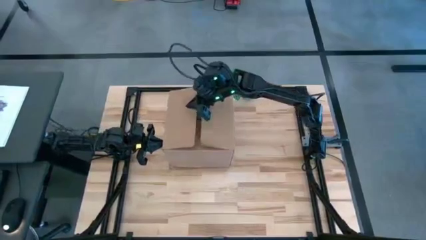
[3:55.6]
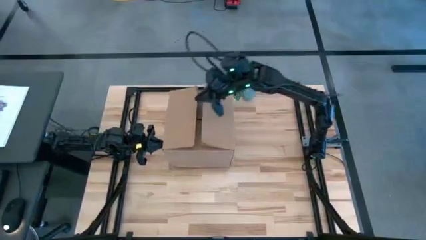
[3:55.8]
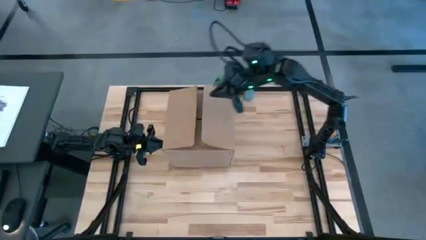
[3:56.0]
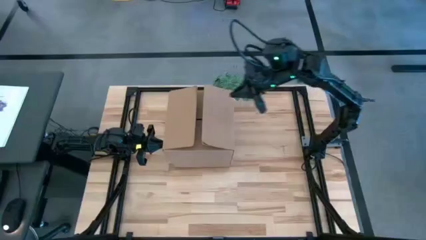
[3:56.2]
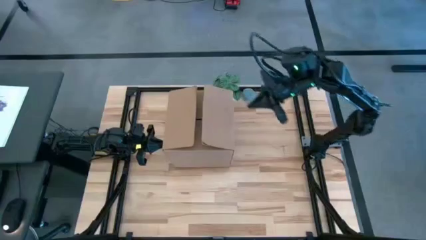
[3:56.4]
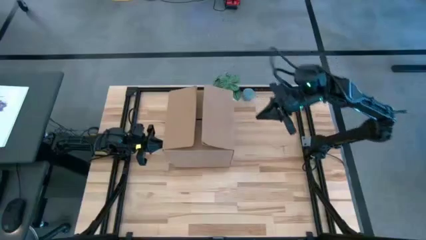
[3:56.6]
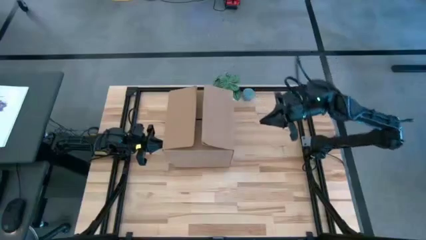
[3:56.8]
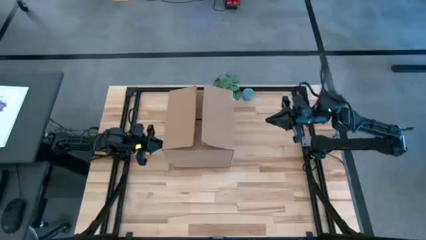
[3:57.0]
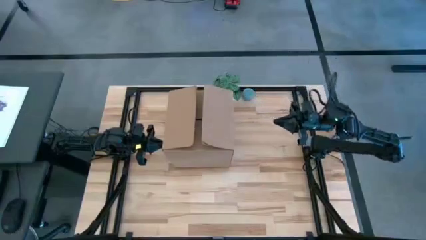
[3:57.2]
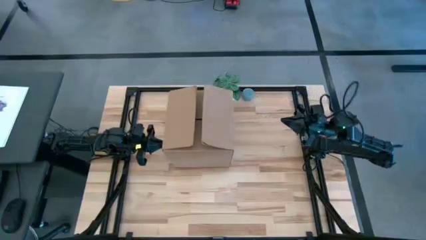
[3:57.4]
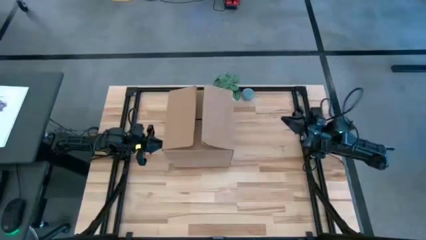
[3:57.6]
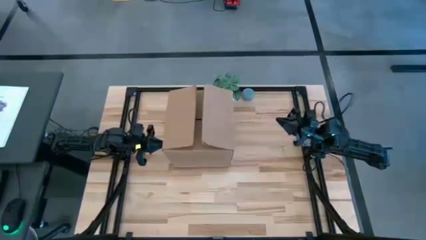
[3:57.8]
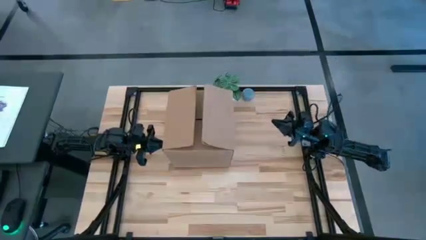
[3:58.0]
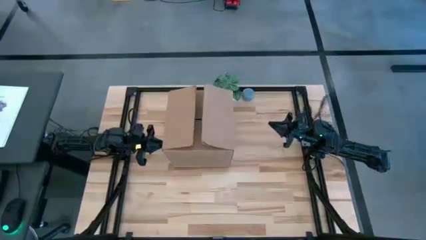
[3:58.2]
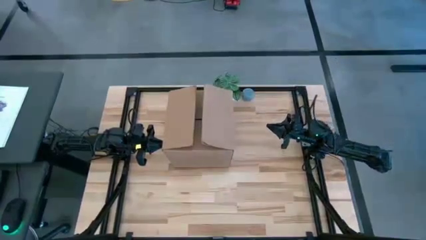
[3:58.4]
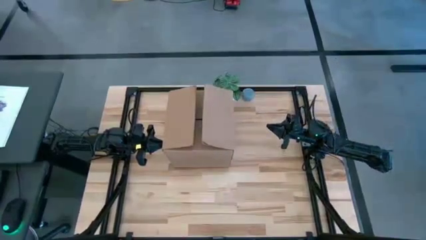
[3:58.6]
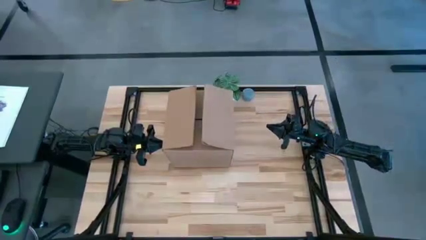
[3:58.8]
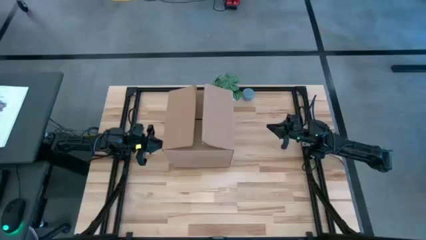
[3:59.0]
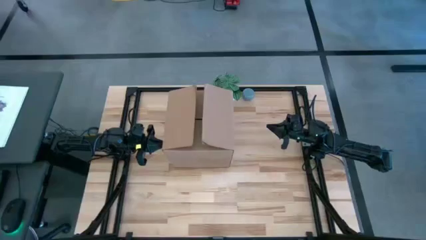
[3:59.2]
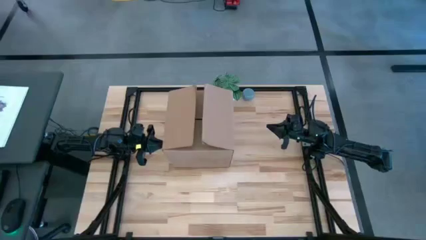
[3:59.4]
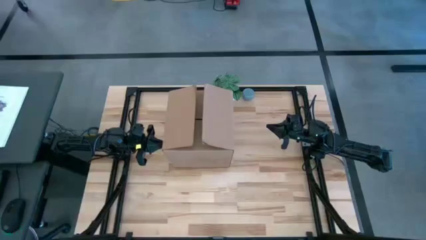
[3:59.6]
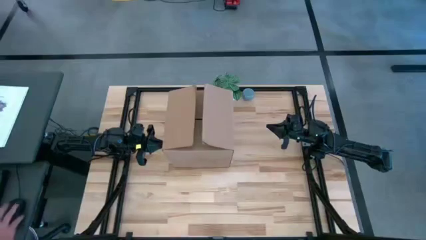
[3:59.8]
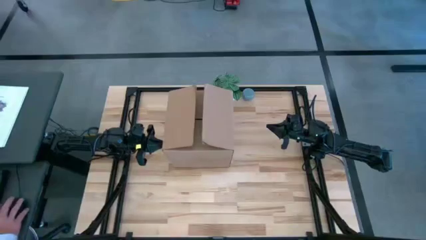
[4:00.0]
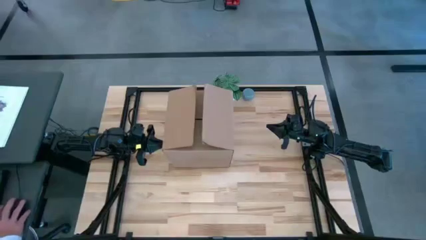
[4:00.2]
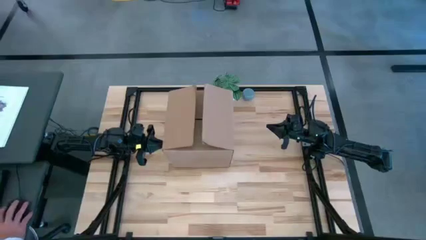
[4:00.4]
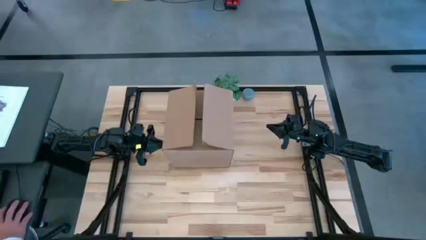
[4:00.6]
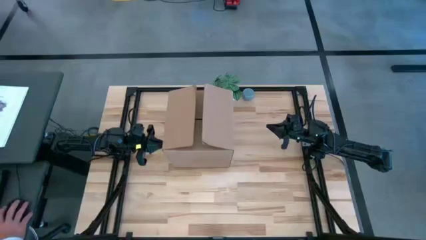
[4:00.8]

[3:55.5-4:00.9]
Task: wrap mug
Return to Home Position

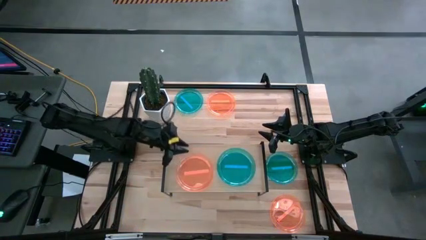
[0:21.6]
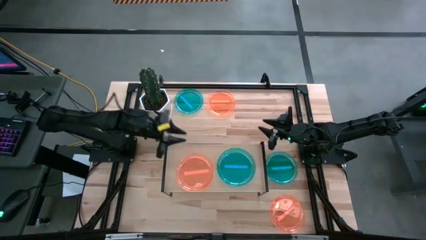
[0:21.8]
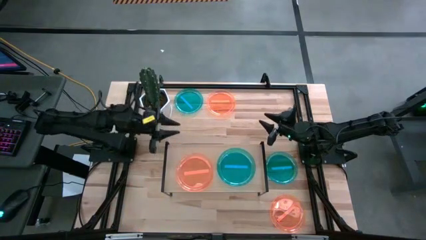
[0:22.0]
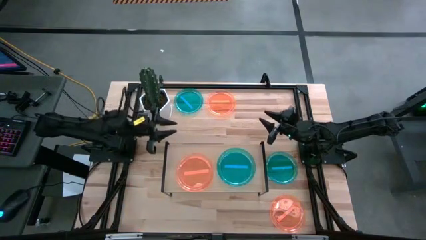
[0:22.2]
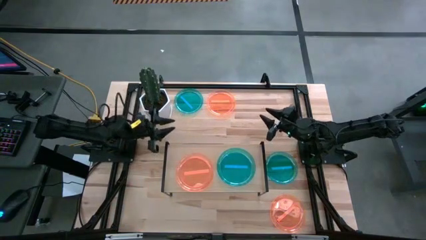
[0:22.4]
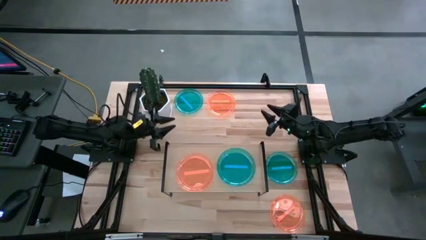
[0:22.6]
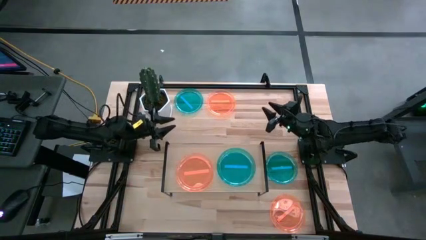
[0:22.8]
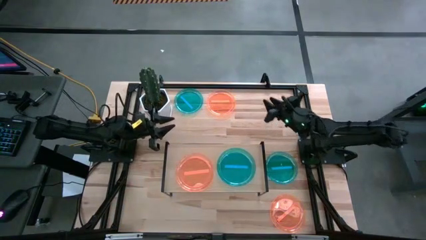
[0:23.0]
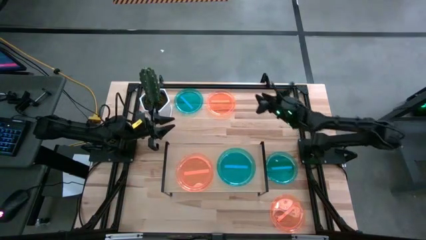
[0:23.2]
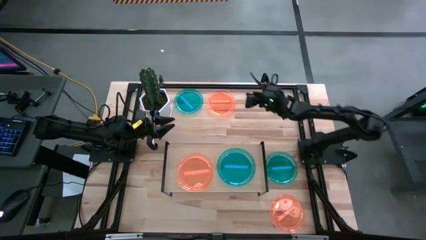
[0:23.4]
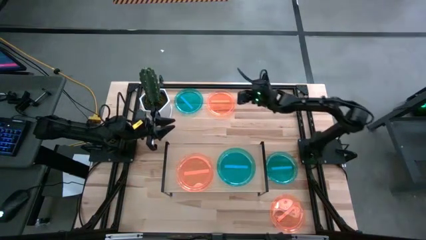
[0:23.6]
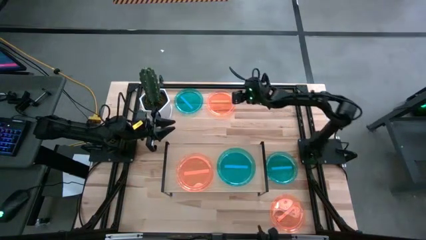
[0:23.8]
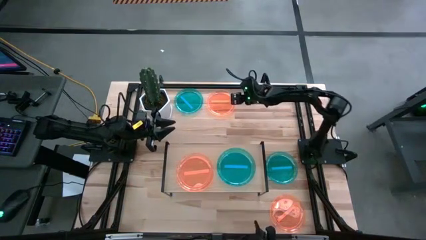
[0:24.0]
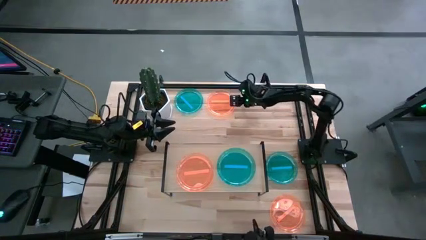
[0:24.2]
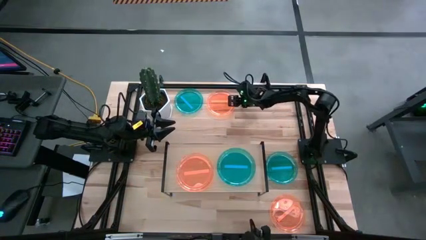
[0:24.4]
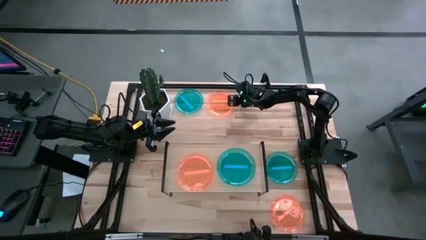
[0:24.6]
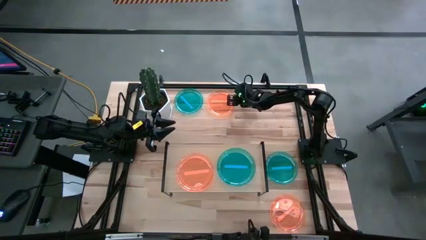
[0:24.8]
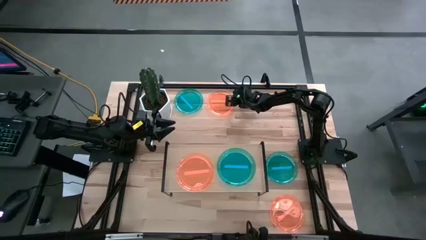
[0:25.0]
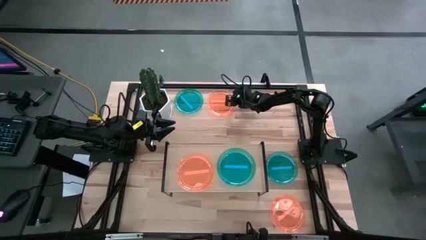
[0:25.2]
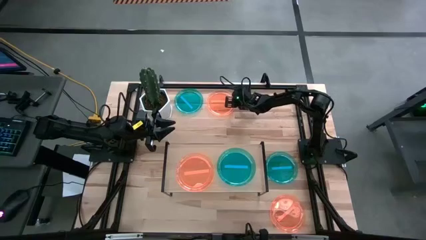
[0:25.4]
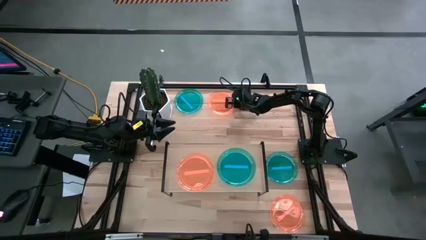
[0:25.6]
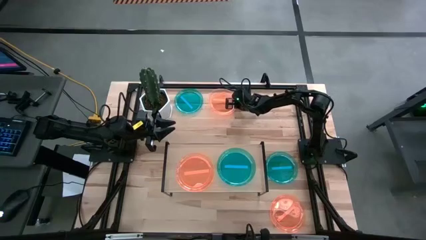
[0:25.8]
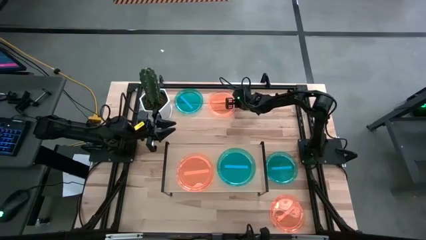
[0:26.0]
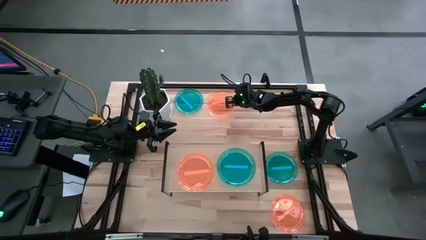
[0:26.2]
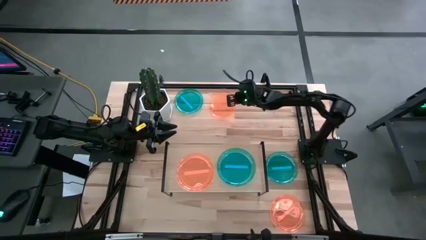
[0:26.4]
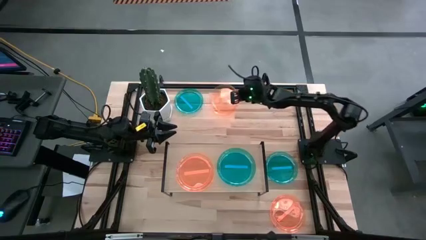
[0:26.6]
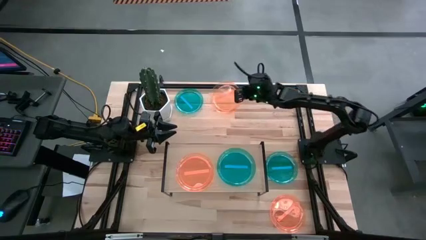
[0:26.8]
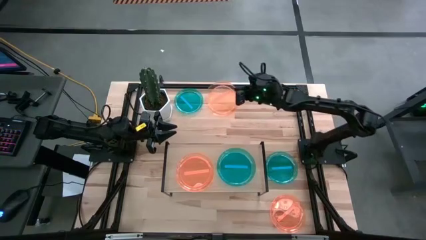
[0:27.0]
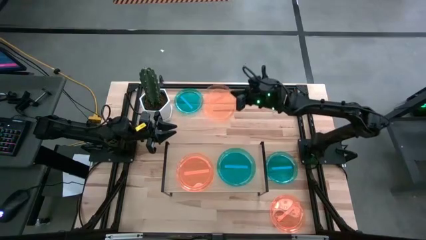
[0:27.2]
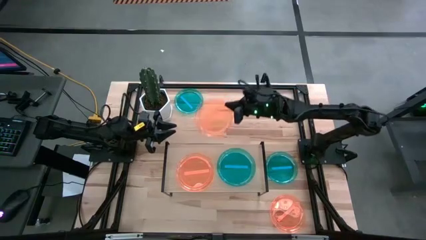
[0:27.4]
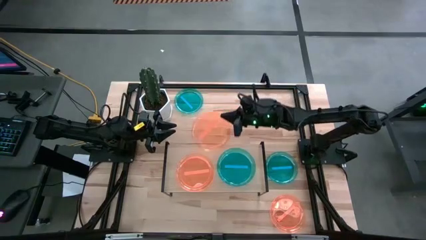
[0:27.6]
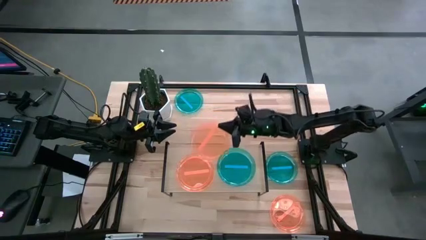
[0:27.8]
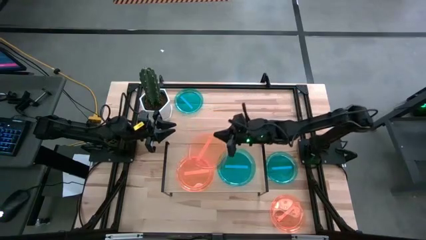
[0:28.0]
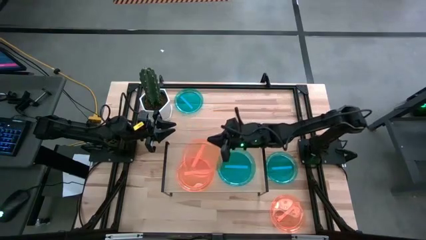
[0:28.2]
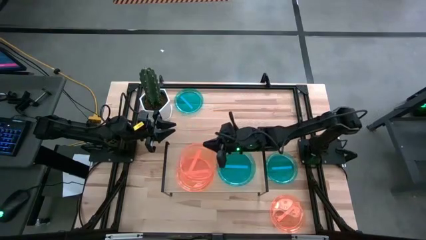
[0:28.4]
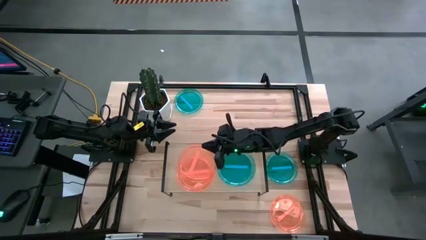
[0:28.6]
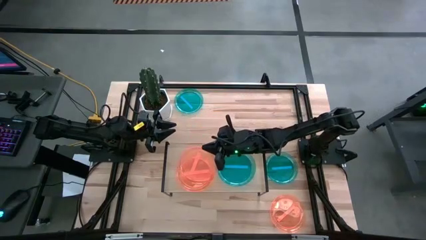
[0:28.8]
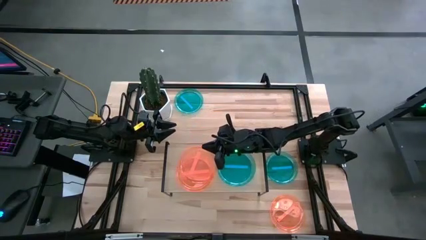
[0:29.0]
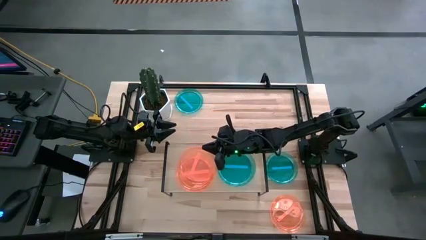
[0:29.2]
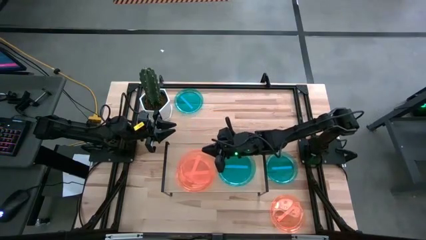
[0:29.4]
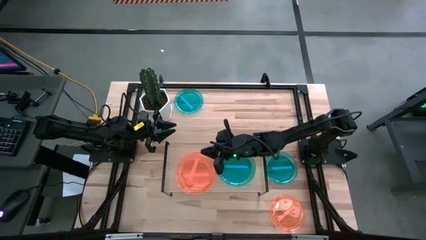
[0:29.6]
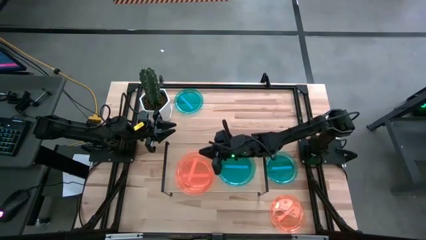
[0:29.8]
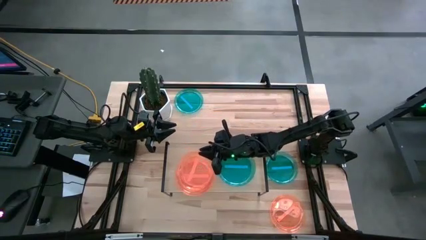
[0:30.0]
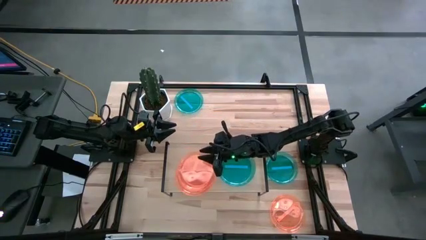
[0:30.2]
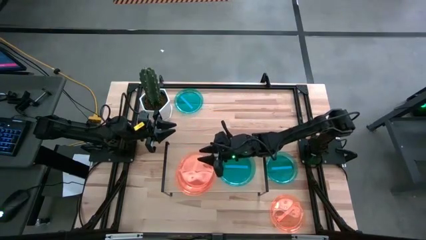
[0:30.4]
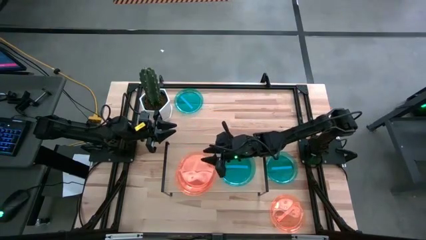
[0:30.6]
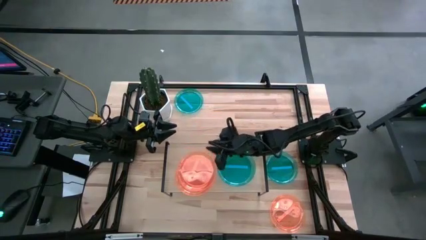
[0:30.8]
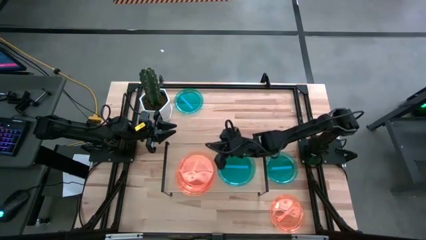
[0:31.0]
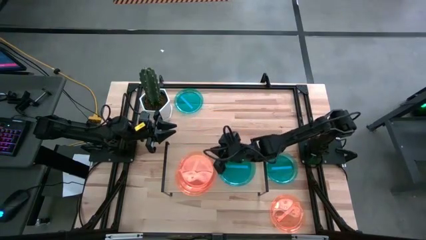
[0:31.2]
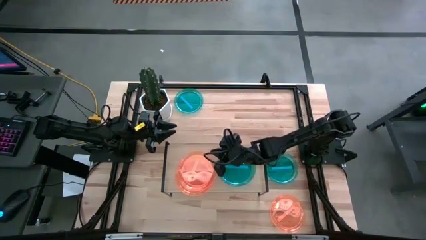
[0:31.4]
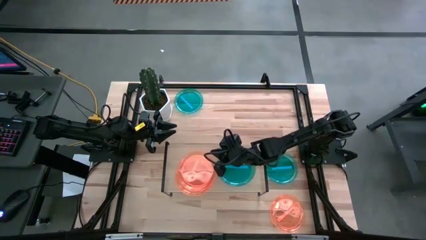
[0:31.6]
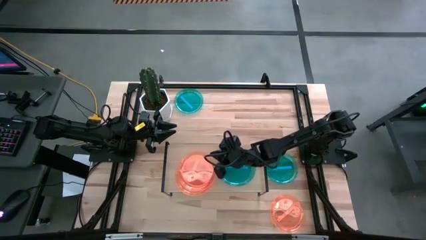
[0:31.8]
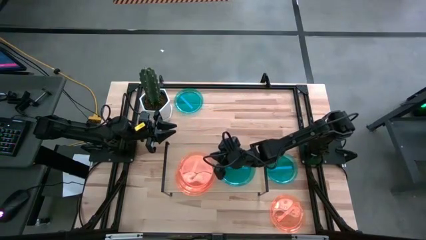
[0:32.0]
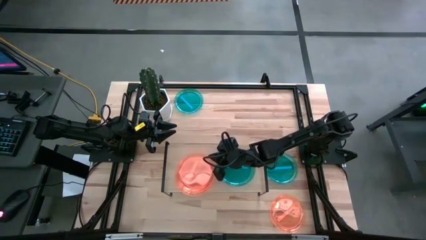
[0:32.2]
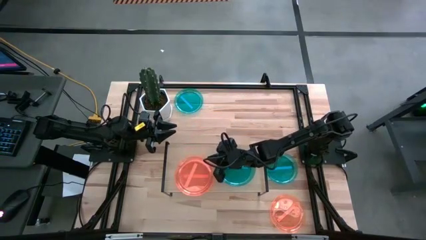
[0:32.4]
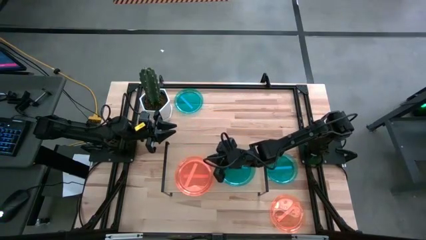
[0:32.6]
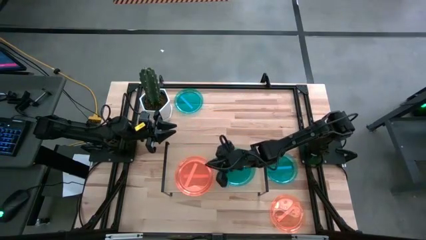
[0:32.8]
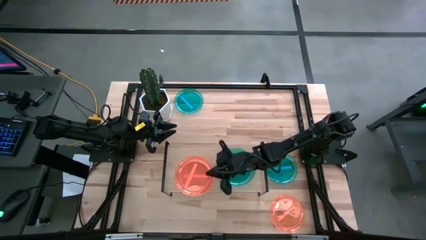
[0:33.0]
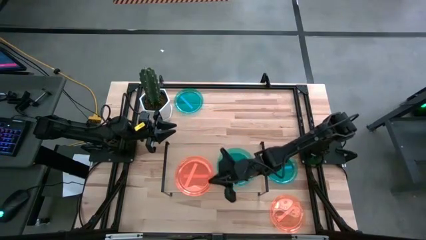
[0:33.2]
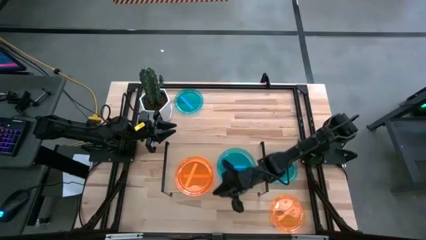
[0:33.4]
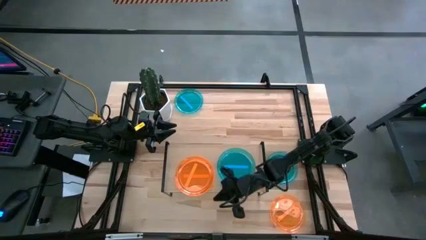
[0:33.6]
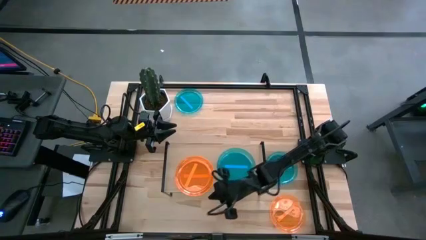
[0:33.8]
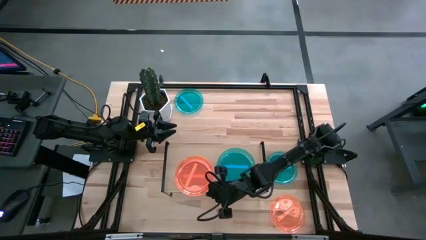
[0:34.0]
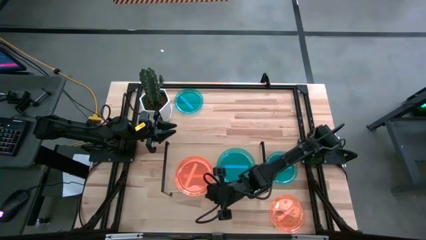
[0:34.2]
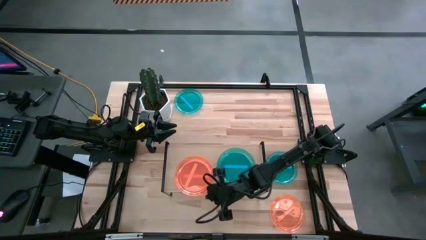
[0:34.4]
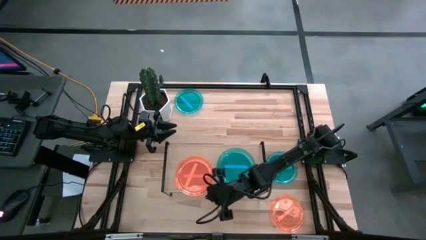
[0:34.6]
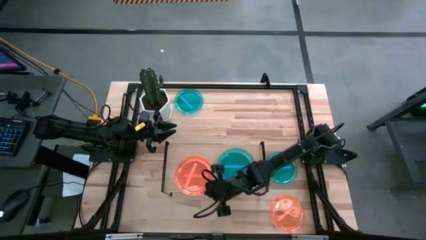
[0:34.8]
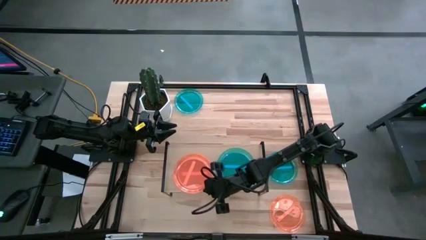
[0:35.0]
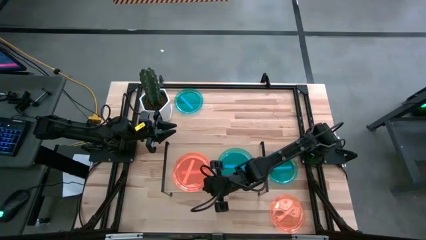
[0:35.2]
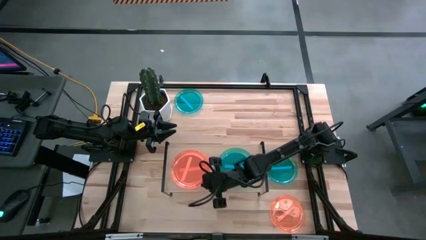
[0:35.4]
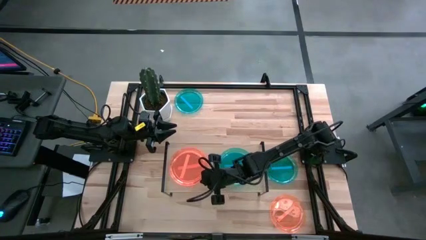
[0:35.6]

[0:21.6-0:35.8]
Task: Place and stack plates onto a shelf
Stack the top orange transparent plate on top of the orange transparent plate
